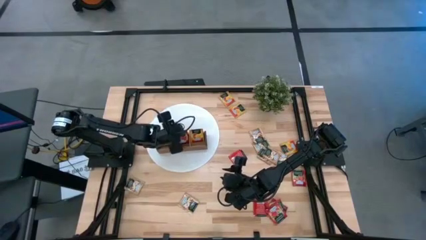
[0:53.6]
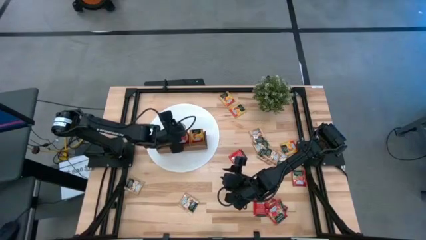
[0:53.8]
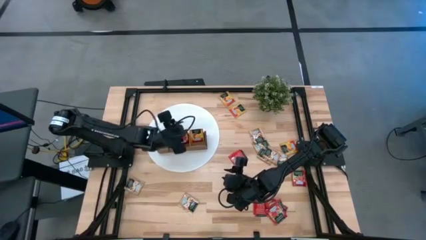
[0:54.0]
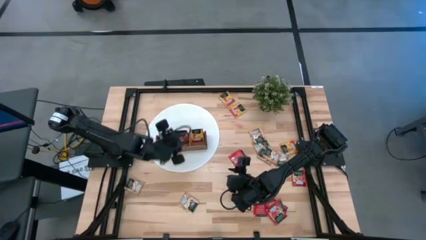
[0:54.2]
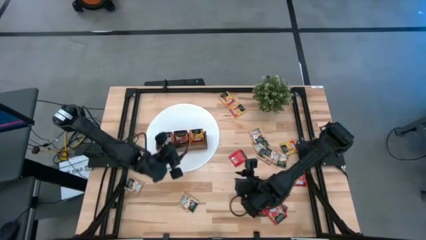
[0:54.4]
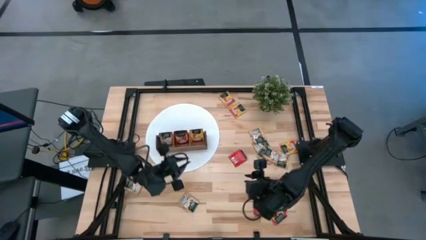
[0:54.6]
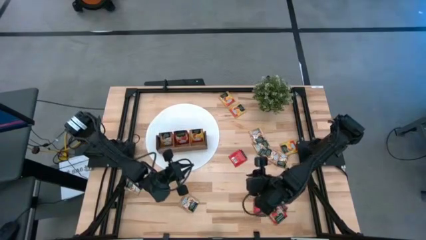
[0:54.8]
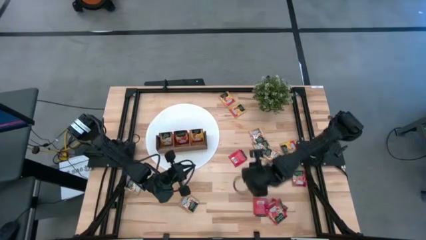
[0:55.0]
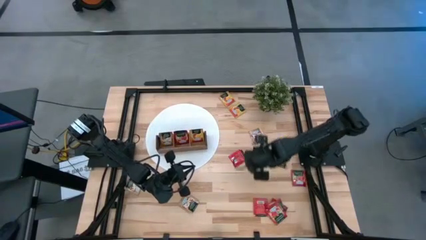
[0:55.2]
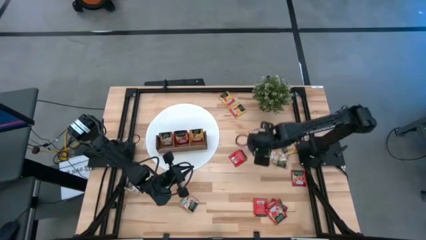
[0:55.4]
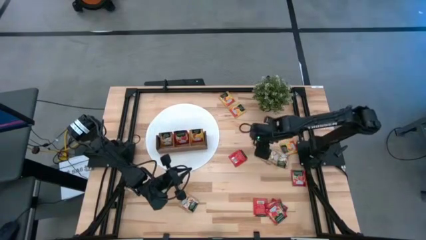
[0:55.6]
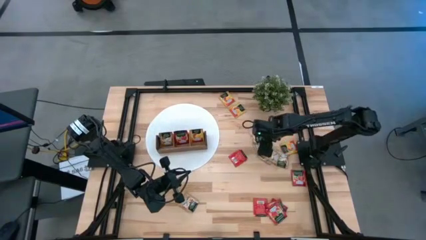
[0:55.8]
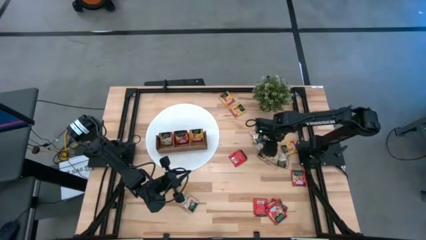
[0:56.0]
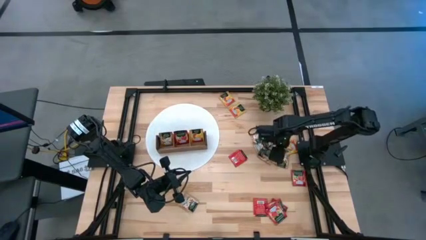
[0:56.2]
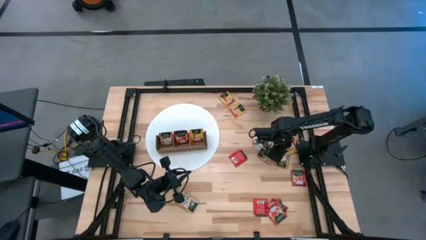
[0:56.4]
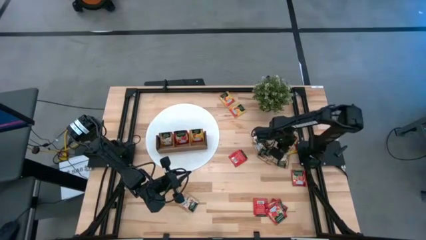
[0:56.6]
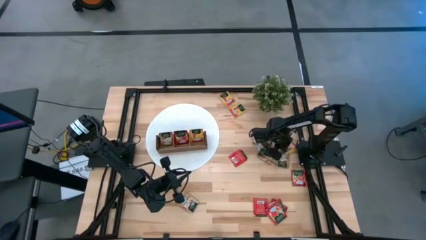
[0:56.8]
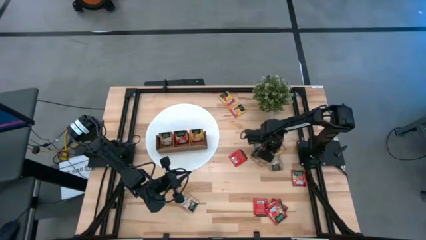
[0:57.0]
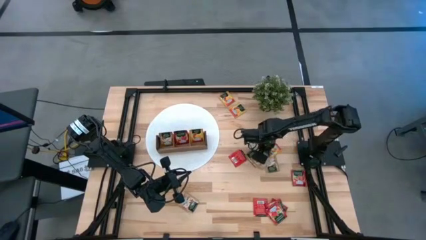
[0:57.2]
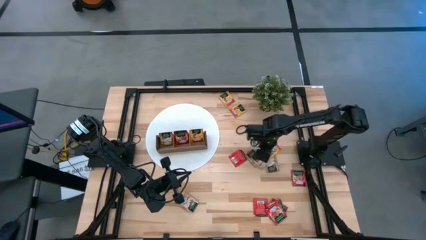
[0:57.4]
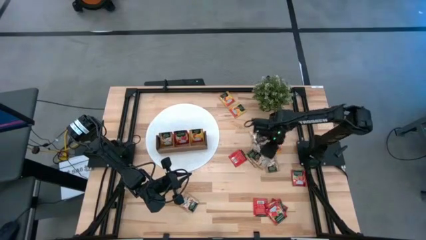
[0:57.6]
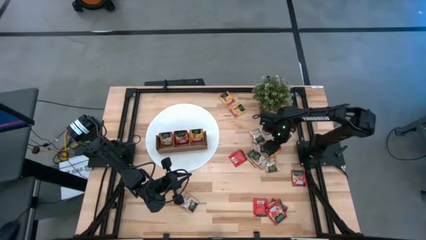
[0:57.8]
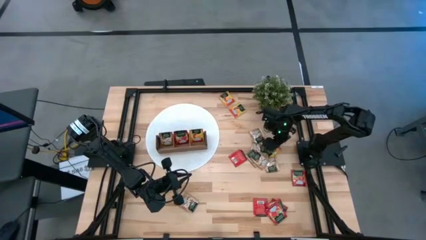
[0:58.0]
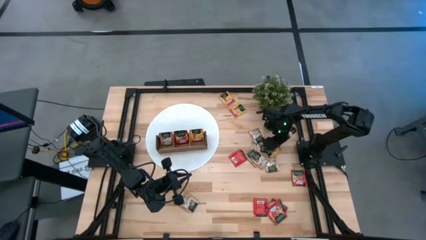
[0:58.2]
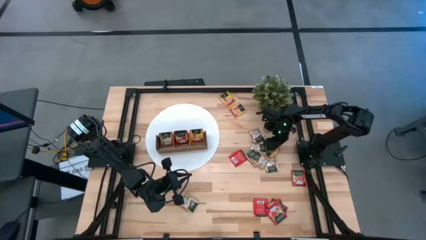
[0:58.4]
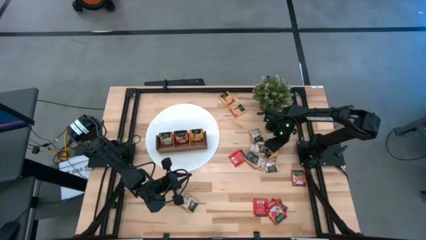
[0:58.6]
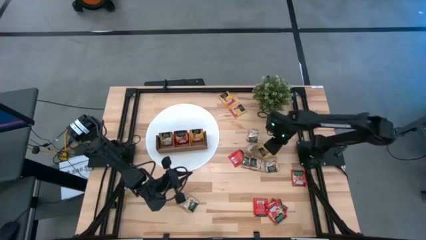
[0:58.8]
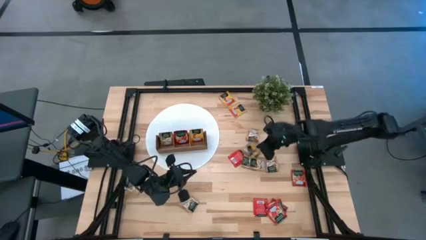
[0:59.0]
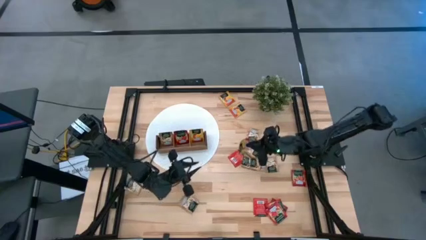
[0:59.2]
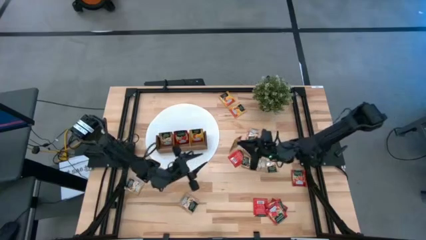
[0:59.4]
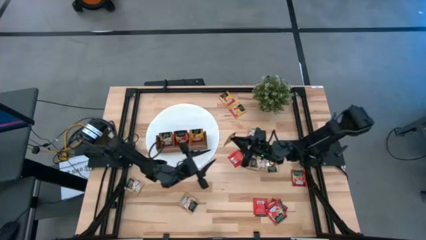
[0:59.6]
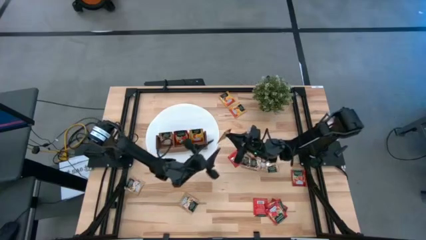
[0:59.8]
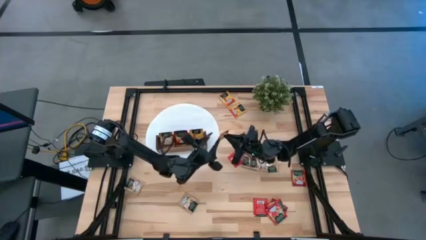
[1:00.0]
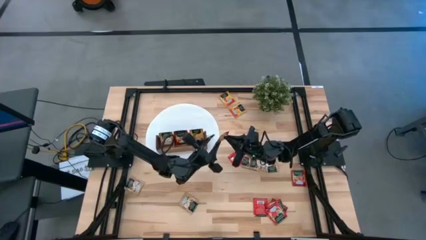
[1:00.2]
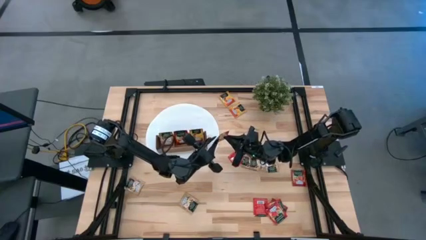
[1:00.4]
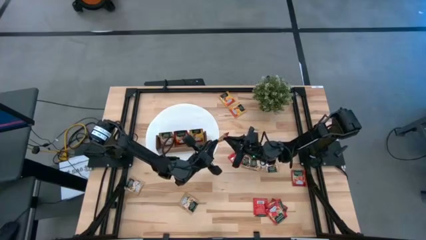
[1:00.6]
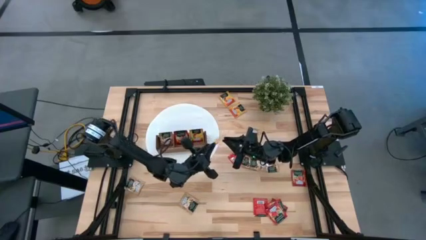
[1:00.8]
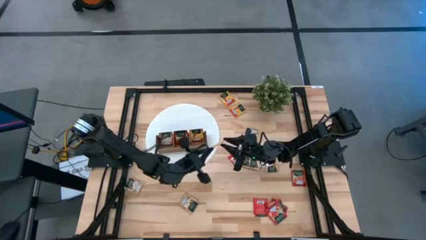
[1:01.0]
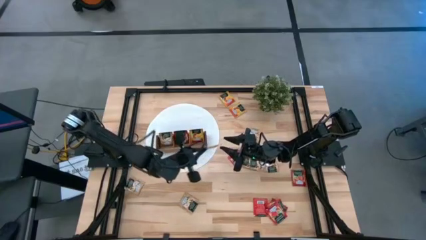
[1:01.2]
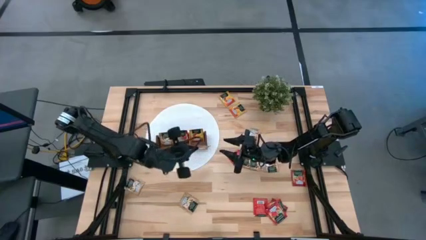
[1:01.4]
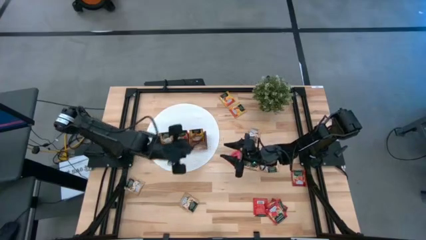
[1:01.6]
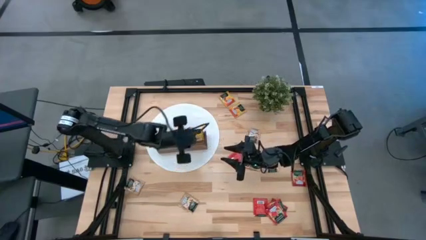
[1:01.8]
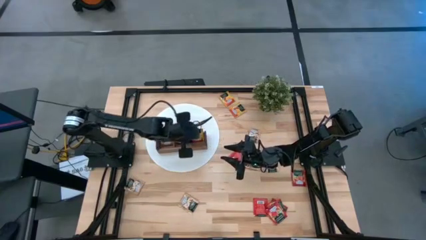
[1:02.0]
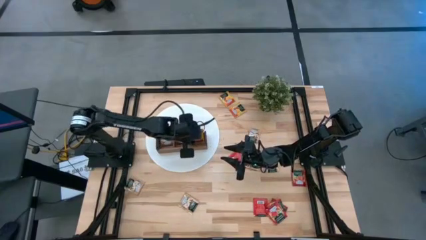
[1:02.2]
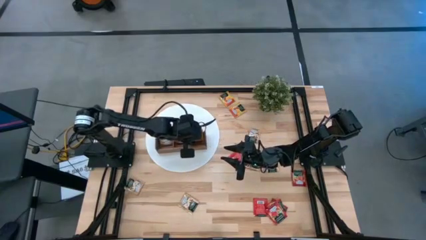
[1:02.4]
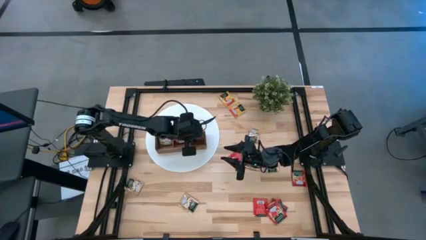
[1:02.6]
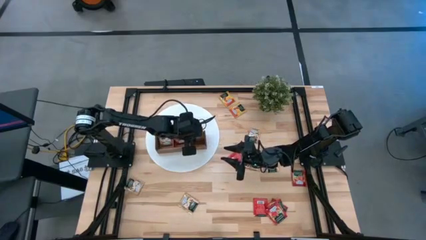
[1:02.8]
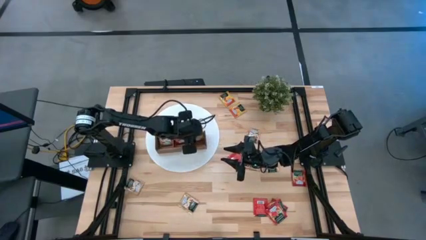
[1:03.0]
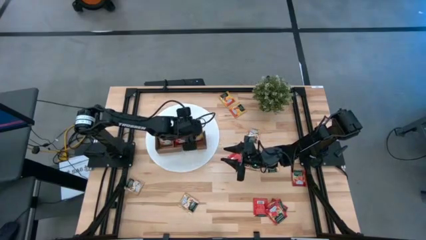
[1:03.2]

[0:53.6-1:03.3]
Task: Pick & Place Tea
Put the yellow tea bag into the right section of the wooden organizer

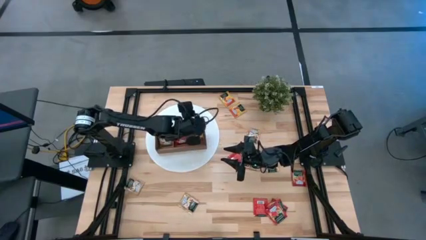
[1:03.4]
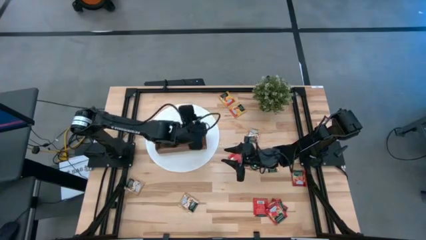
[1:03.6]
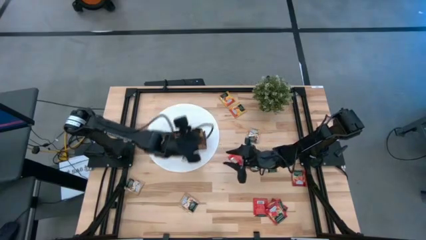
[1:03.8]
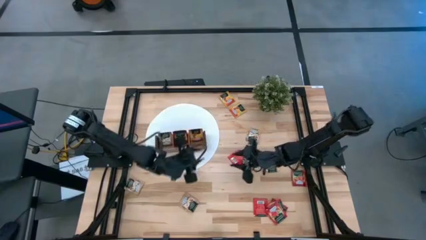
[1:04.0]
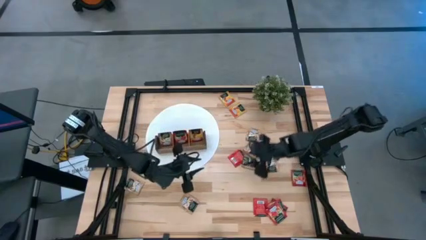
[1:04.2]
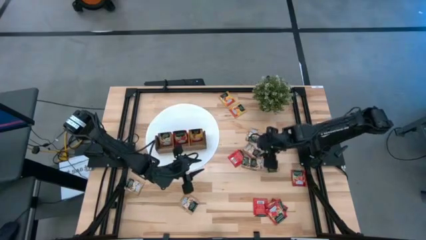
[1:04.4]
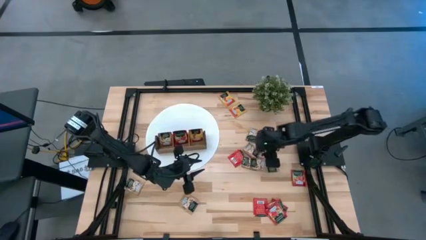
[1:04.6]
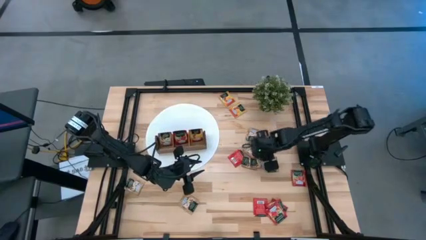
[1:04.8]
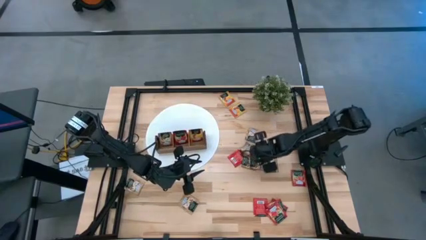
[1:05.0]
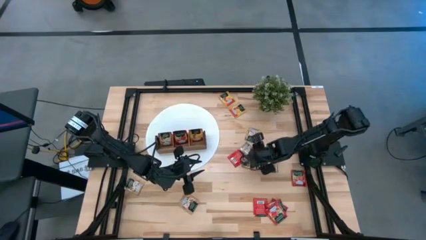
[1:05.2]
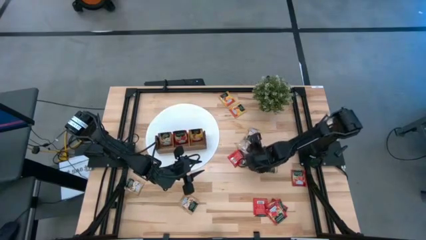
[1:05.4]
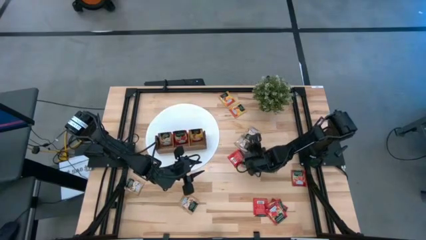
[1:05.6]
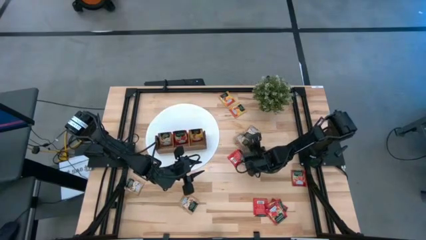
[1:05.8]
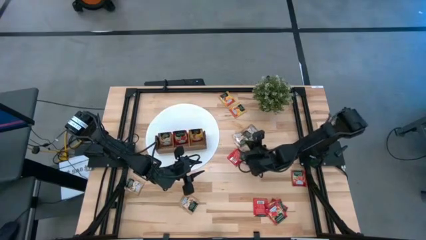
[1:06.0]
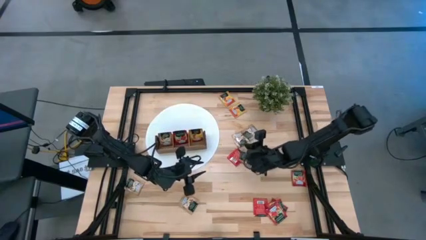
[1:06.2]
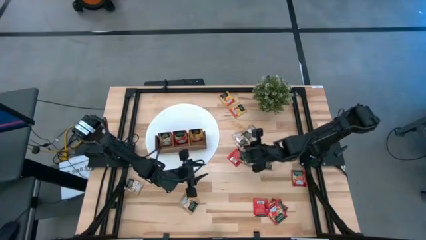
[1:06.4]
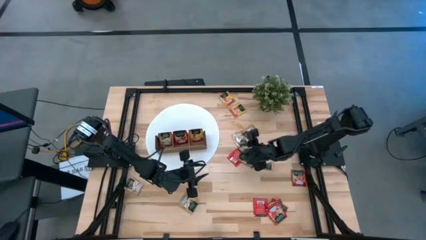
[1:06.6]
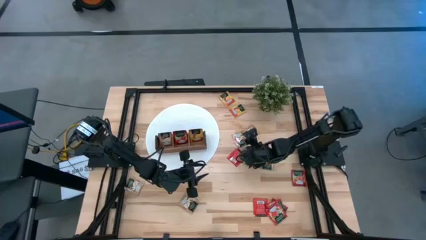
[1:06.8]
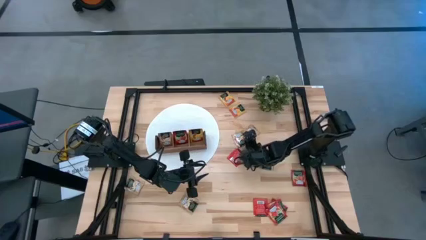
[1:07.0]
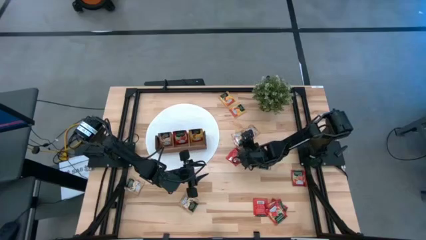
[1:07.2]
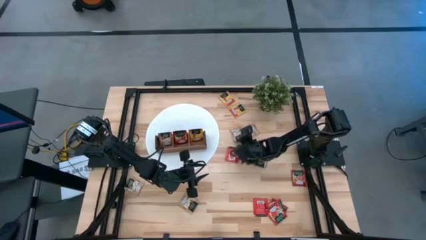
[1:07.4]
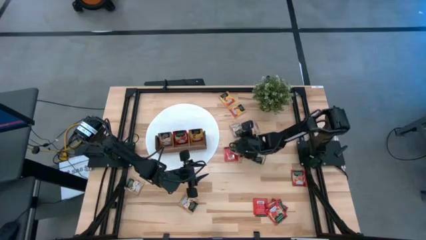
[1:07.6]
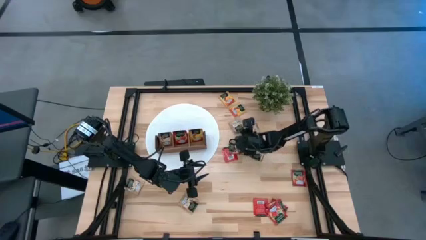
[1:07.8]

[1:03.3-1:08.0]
Put the brown tea bag into the left section of the wooden organizer

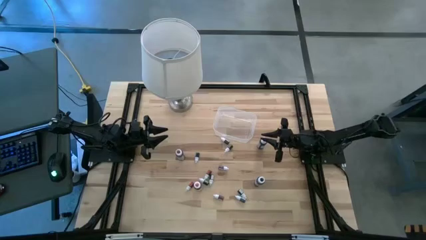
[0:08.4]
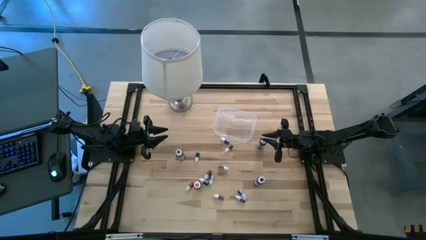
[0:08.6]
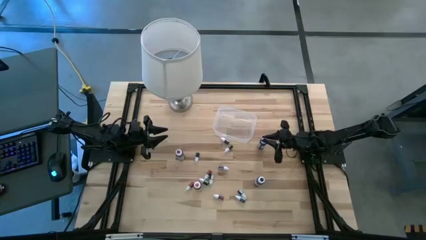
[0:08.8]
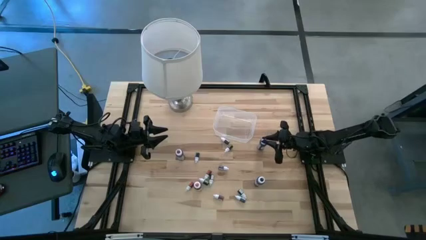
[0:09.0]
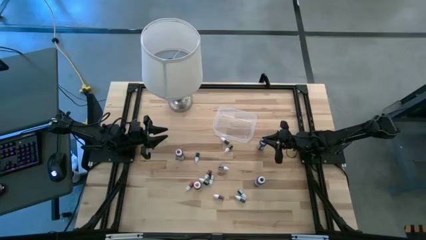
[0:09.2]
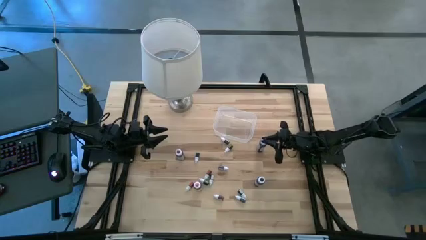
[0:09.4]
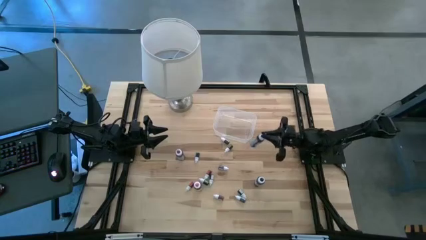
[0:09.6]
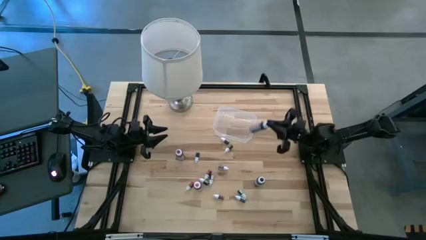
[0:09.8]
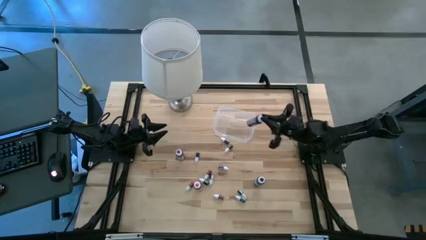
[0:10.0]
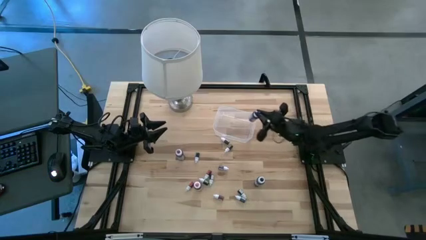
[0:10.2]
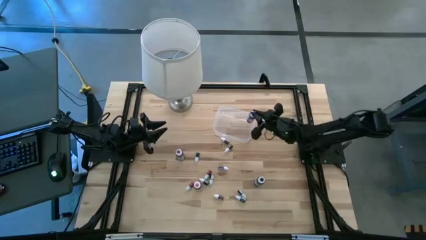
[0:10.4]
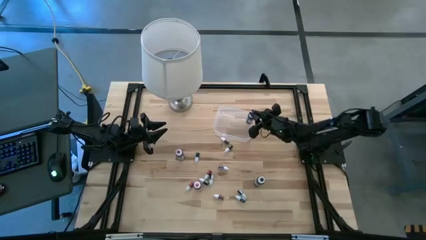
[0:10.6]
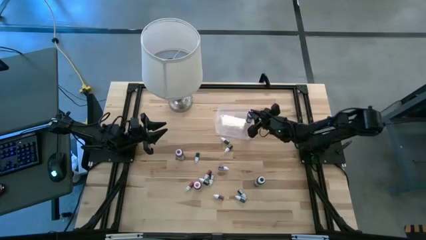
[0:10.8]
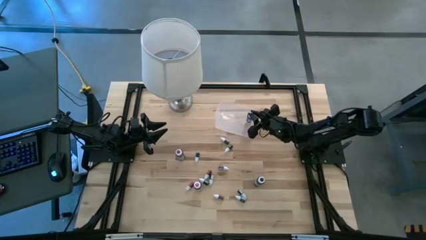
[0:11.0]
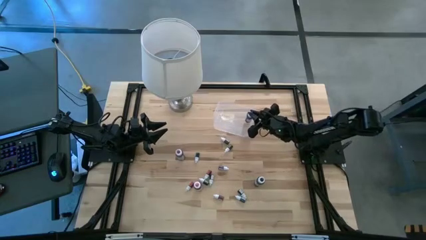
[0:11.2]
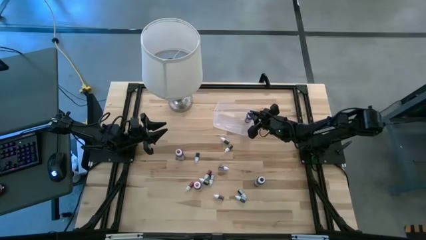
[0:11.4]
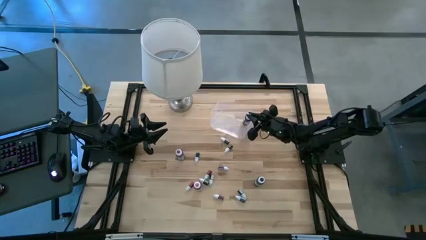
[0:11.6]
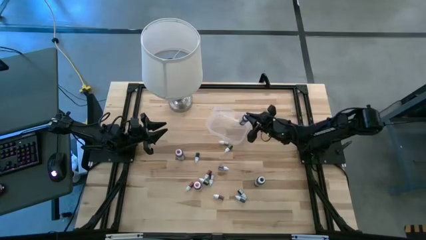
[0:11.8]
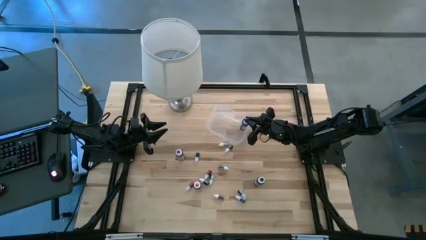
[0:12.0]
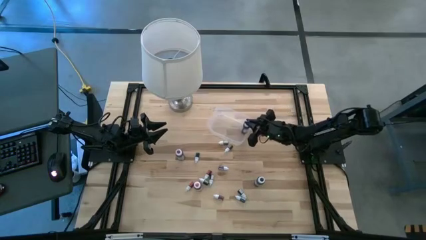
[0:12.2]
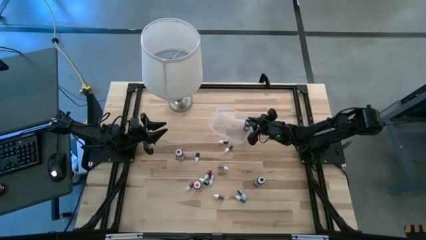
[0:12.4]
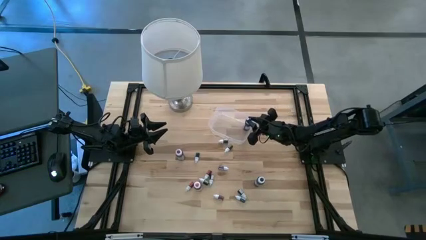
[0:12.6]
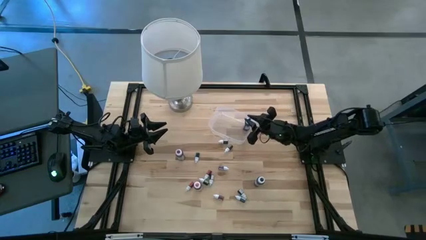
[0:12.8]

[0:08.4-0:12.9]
Task: Pick & Place food coloring
Put the large blue food coloring bottle into the transparent bin
